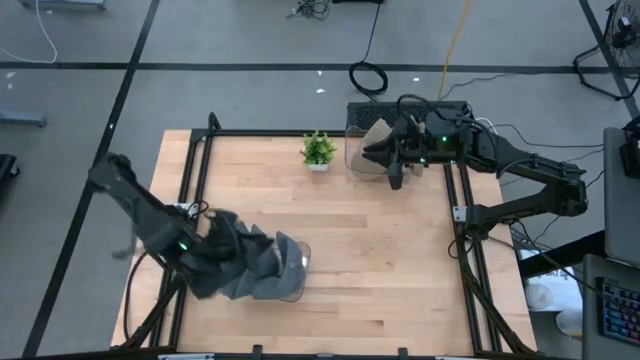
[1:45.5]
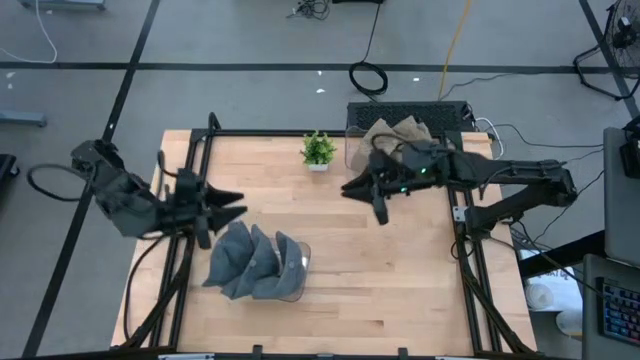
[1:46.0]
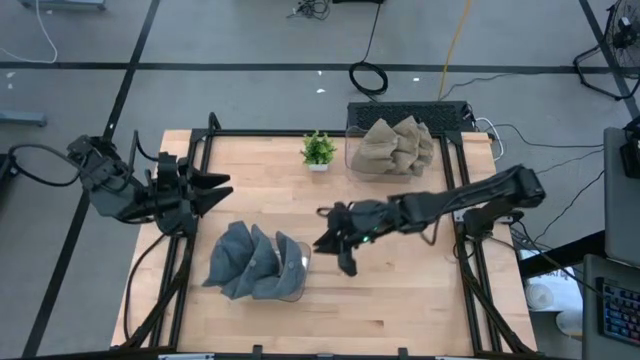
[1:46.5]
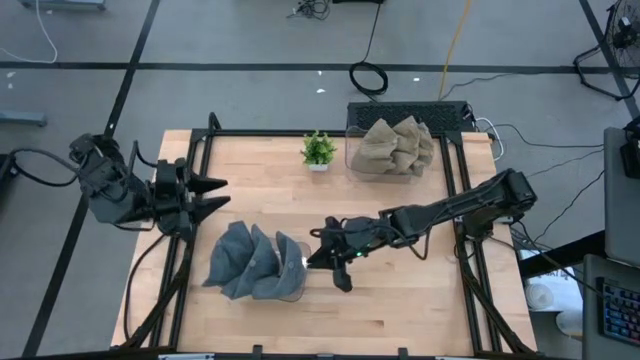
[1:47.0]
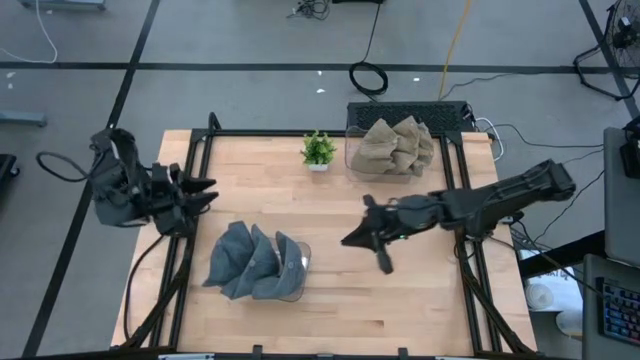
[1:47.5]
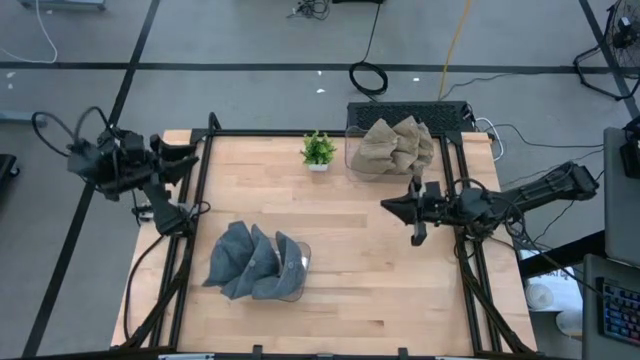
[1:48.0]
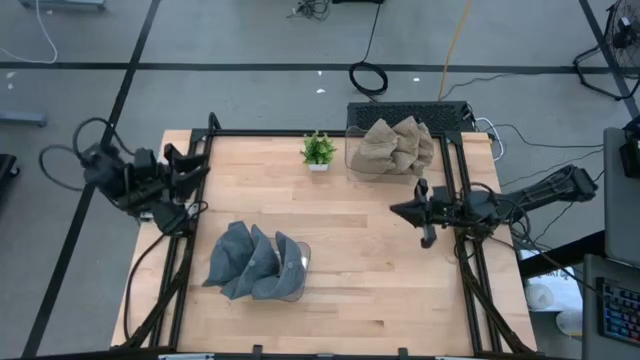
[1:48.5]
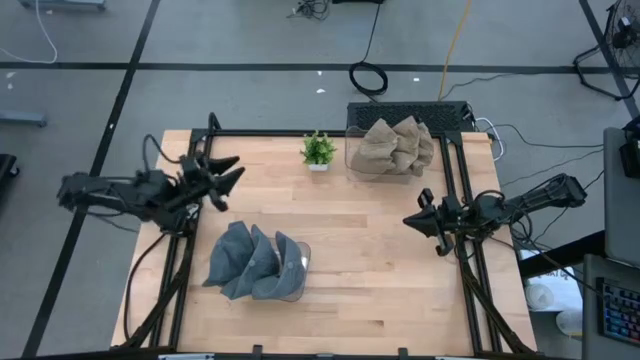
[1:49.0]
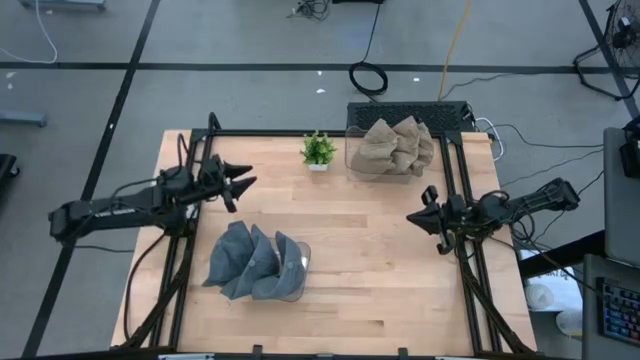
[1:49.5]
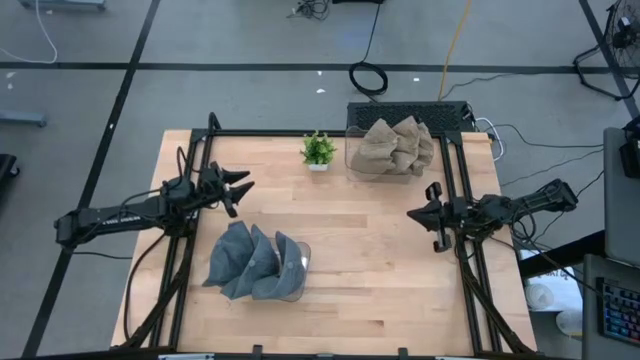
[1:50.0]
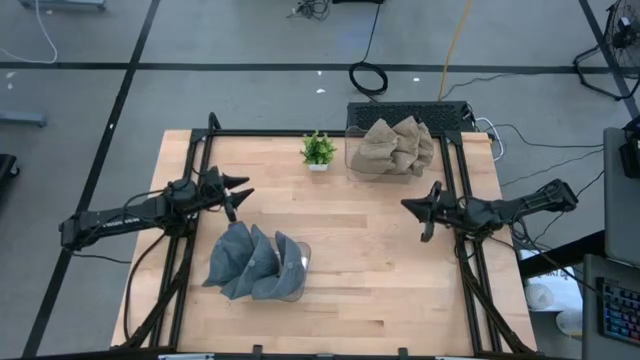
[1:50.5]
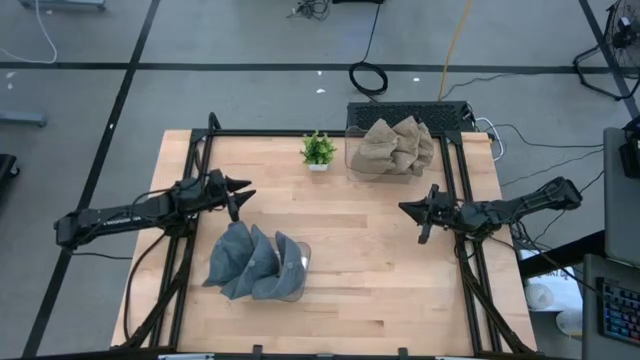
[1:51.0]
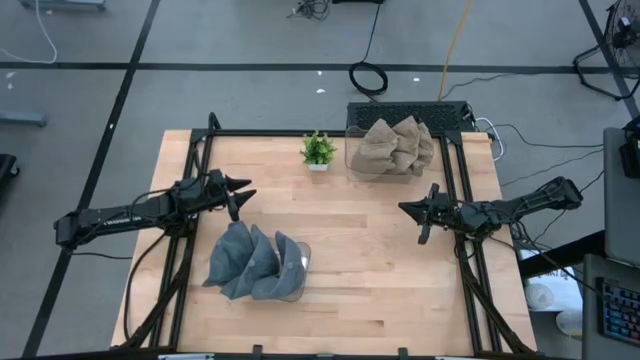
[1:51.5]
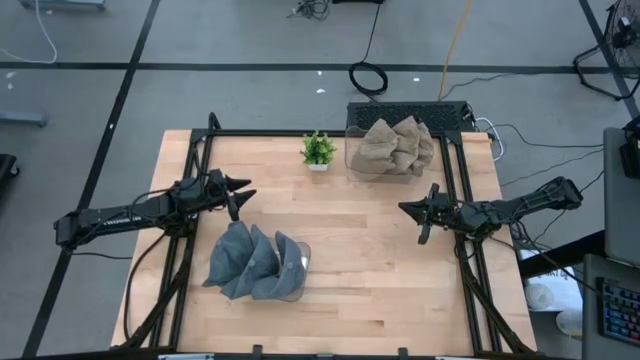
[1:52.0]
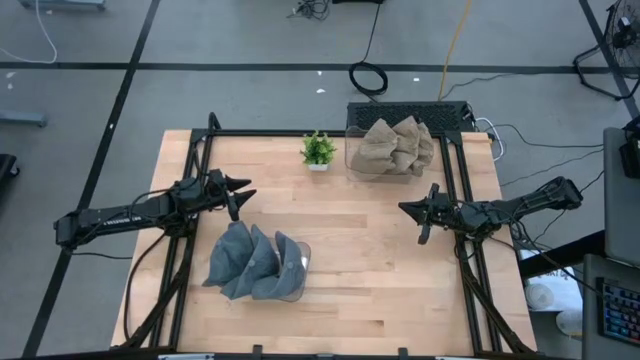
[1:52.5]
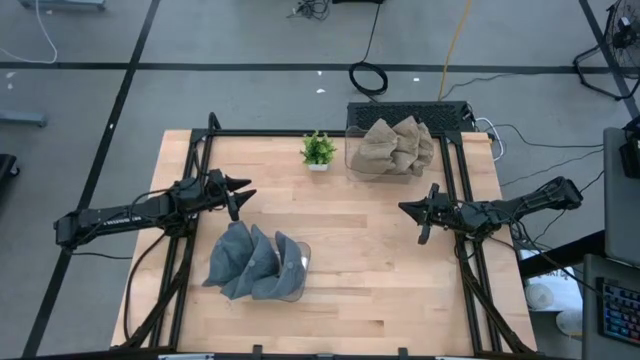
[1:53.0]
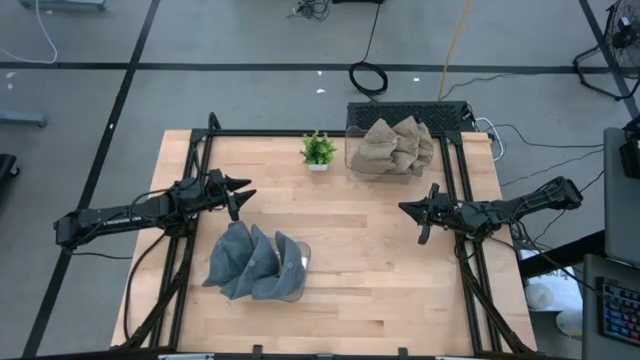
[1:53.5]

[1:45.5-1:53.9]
Task: Pick & Place hat
Return to Home Position

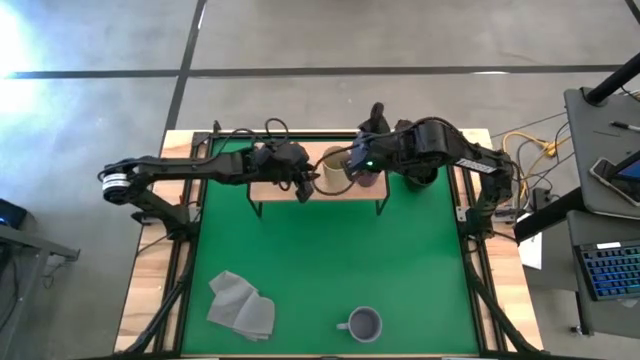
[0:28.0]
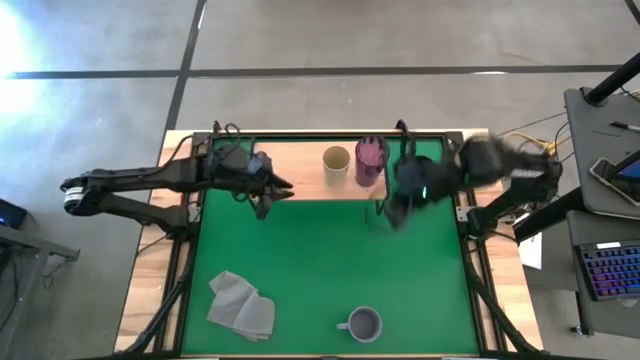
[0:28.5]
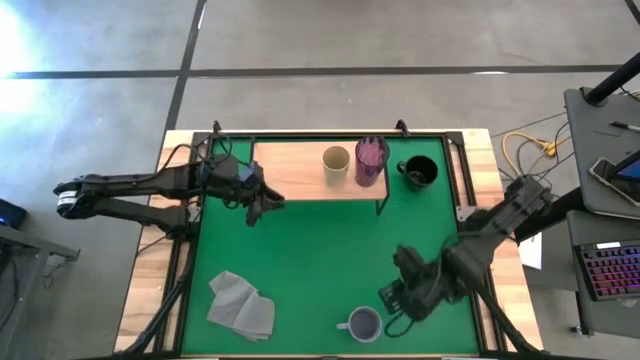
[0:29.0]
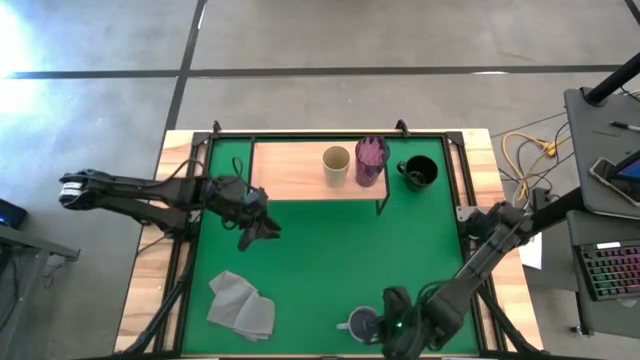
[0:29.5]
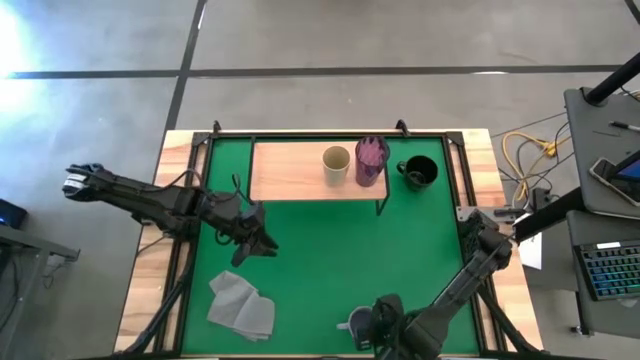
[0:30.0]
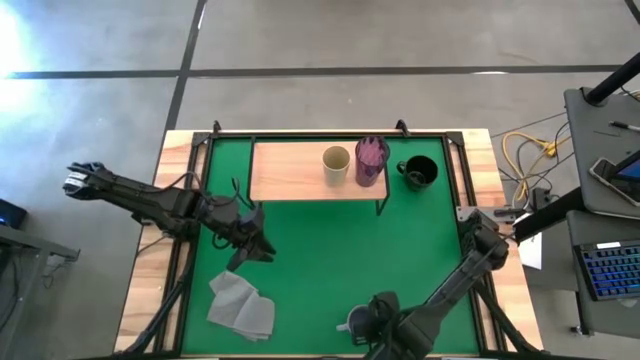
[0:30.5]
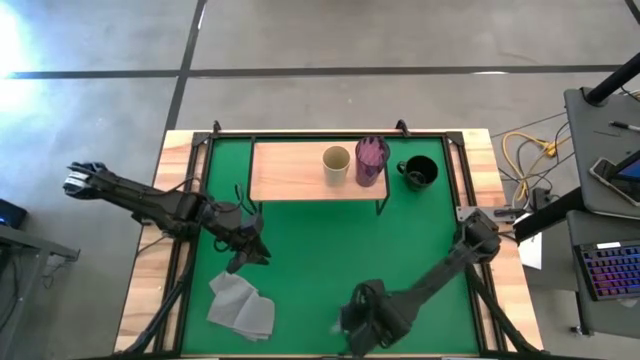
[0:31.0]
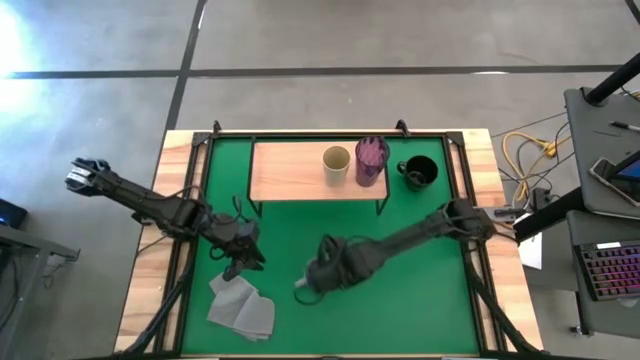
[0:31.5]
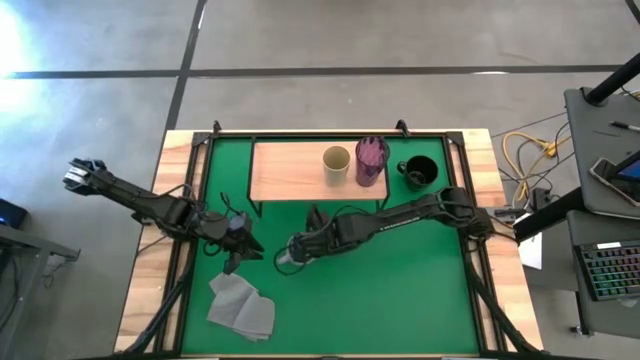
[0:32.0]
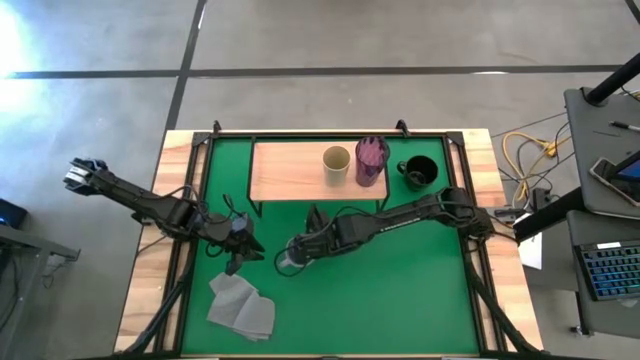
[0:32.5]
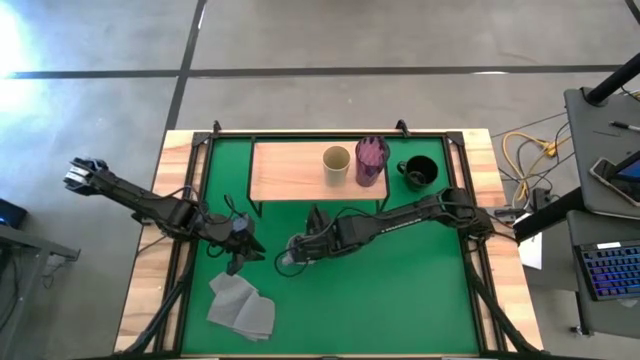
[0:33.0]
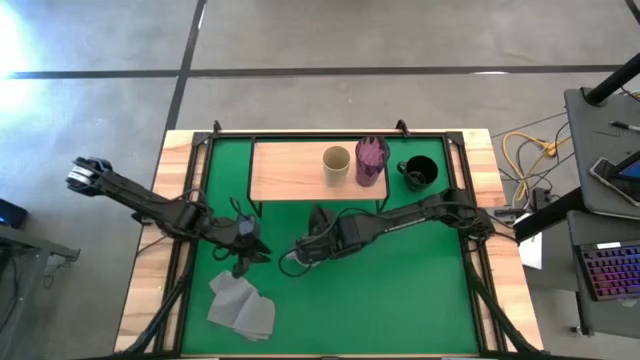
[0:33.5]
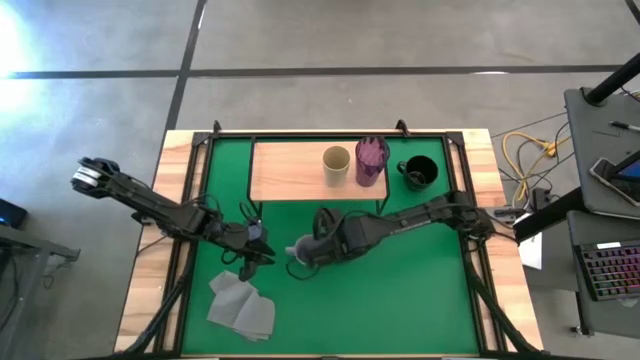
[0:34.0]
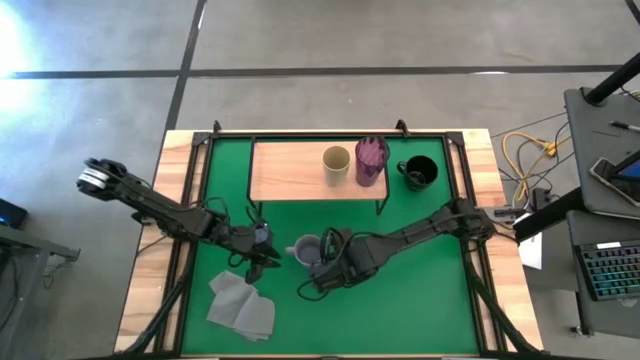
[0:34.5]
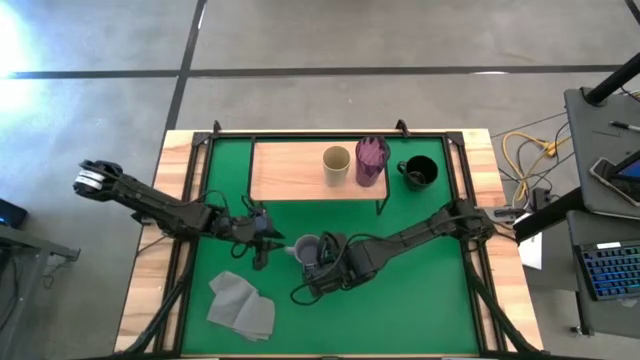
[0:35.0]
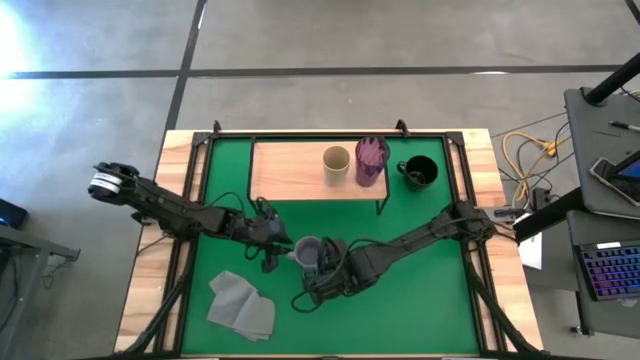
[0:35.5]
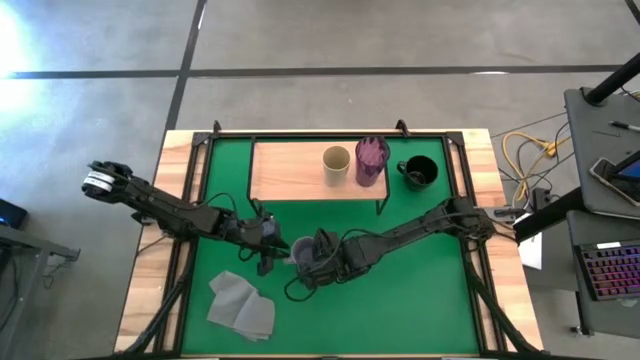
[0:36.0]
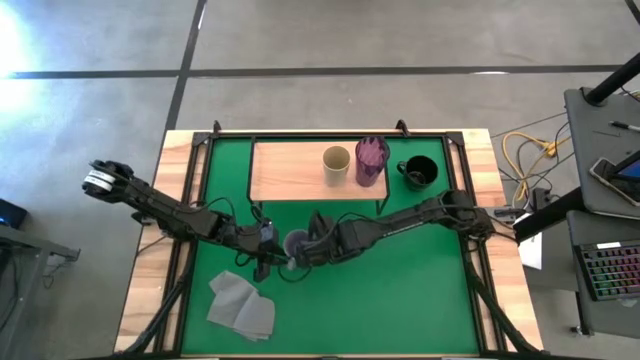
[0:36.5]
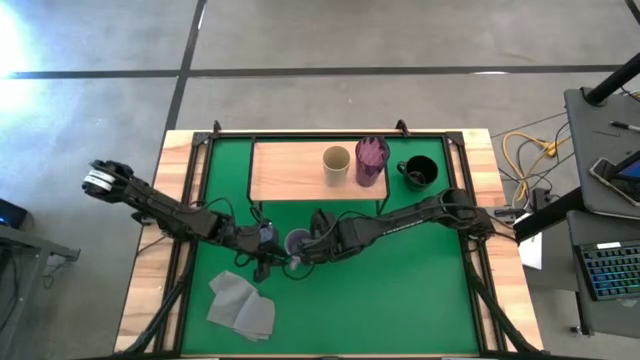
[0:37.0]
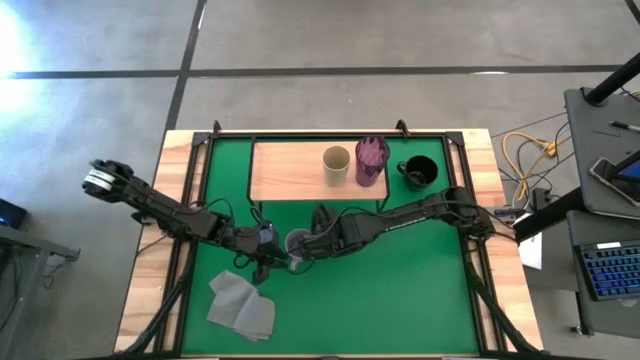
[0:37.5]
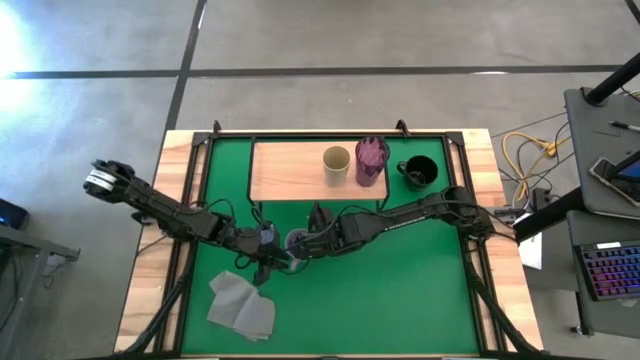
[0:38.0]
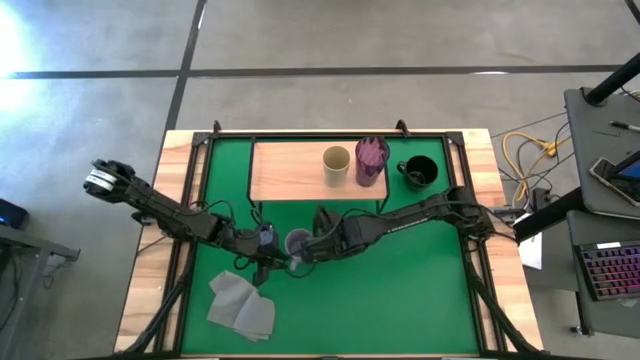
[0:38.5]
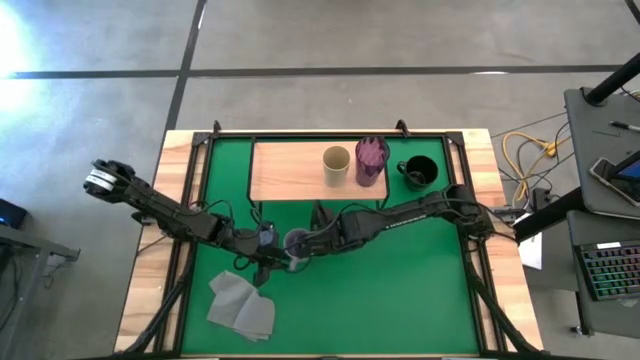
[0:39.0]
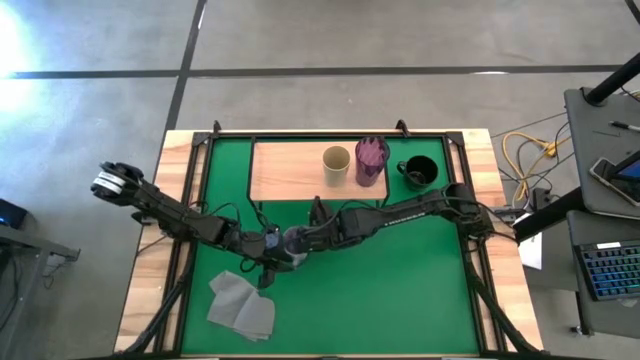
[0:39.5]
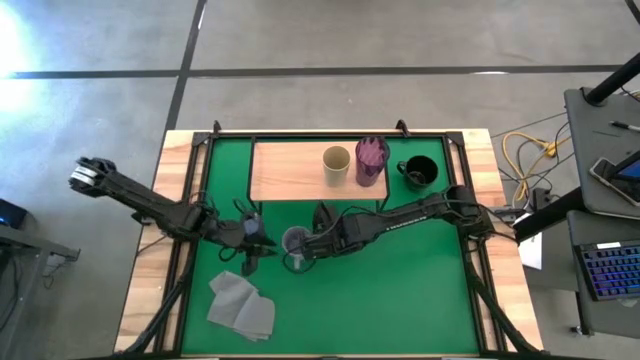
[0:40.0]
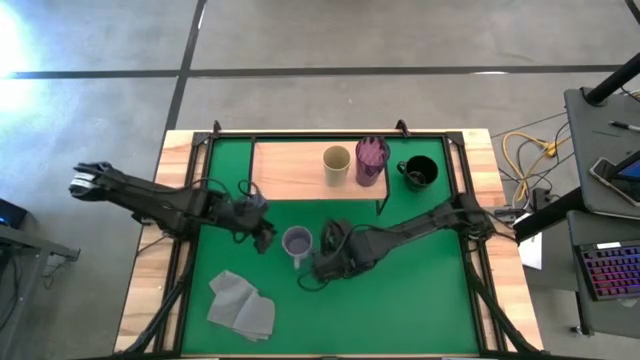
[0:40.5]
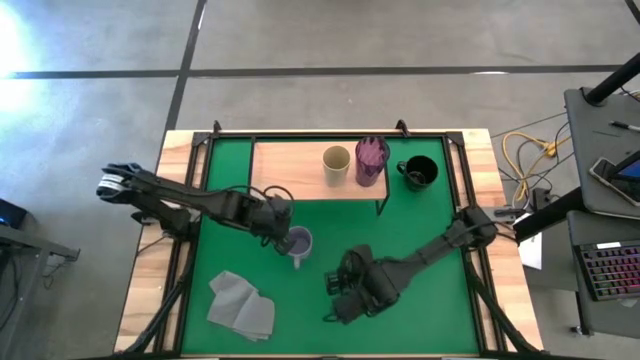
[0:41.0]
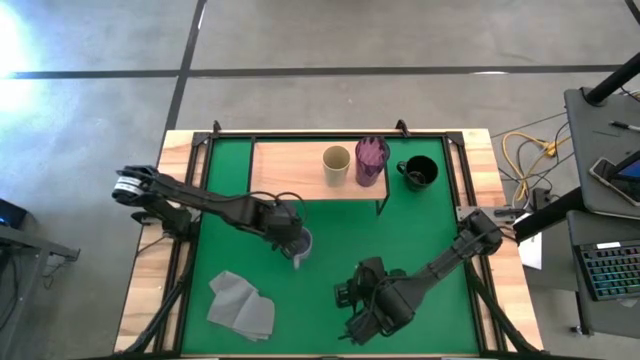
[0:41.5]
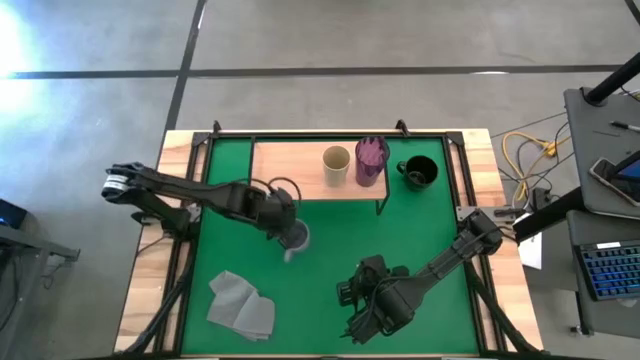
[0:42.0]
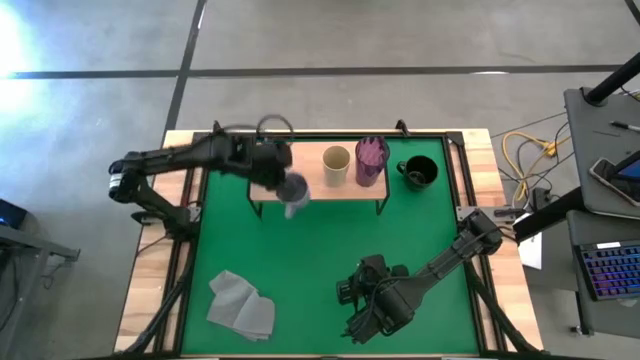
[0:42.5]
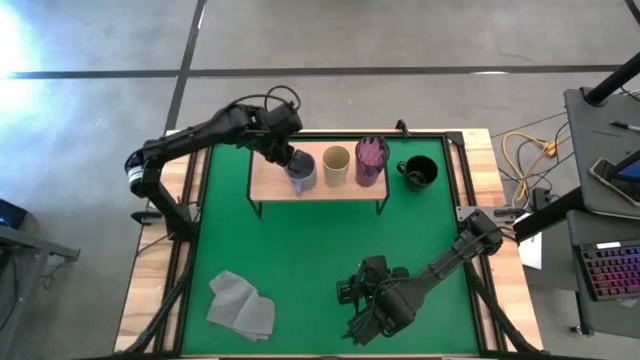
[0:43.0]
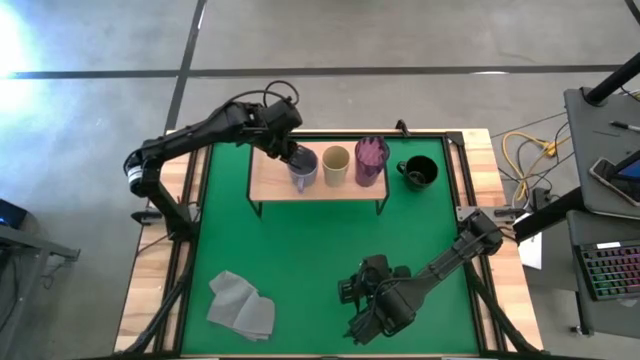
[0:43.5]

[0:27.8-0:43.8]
Task: Stack small to large cups/mugs on shelf
Put the purple mug on the shelf
